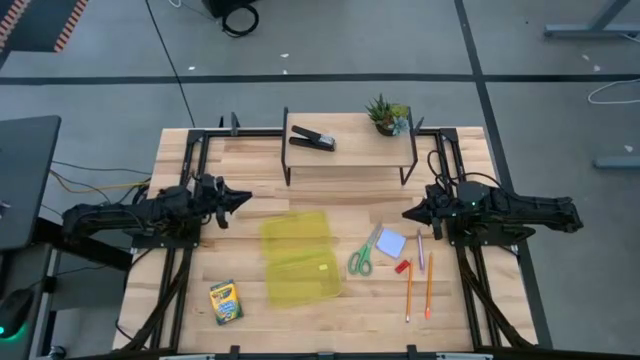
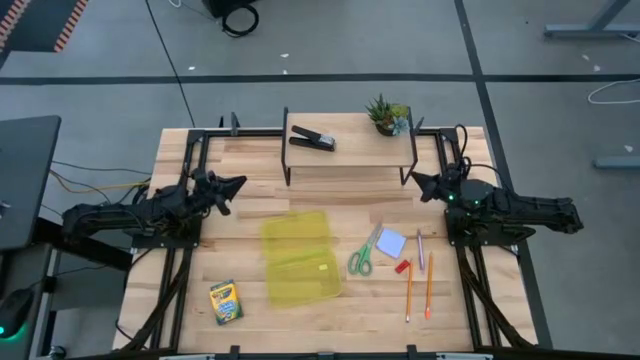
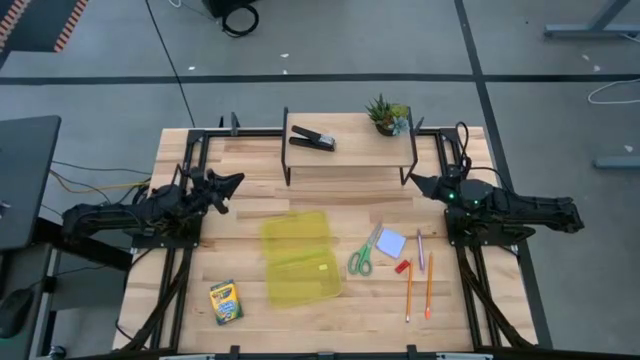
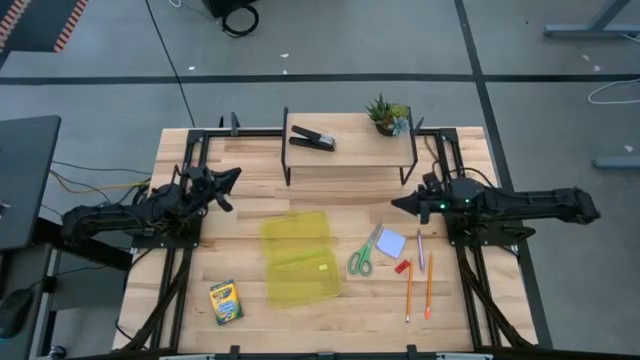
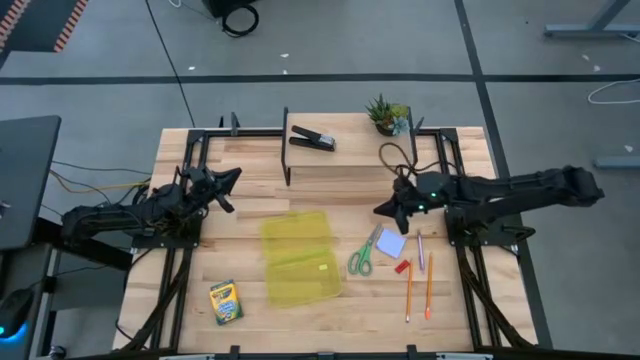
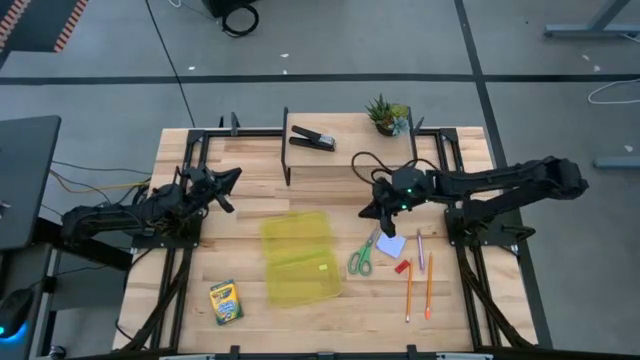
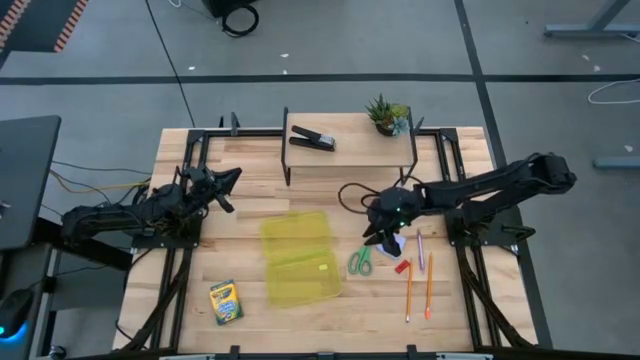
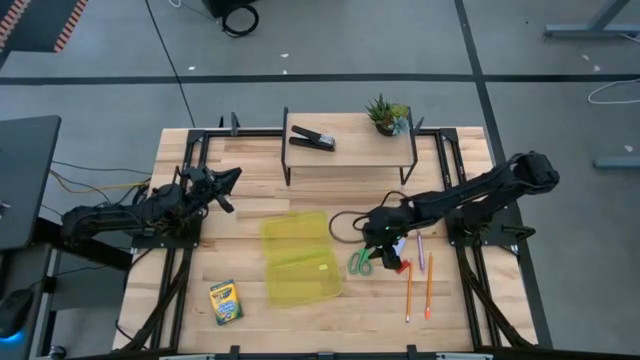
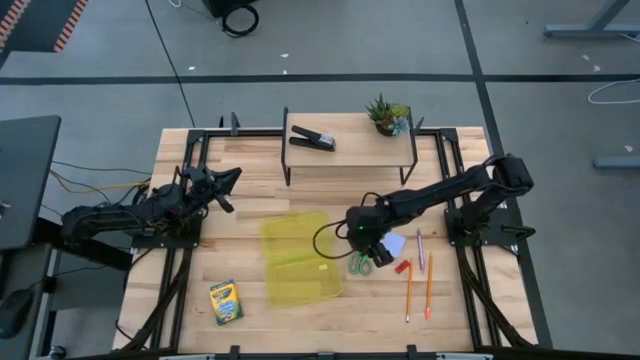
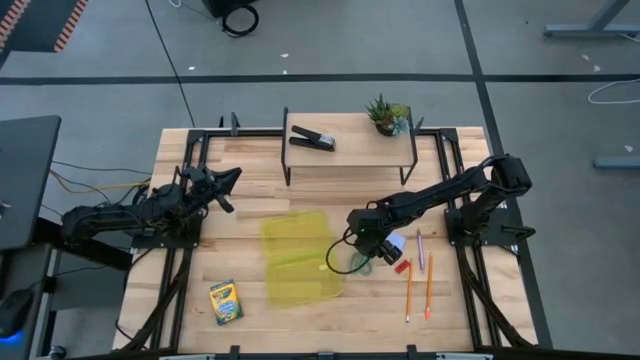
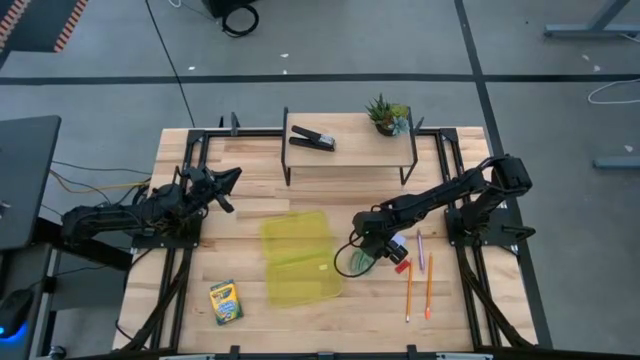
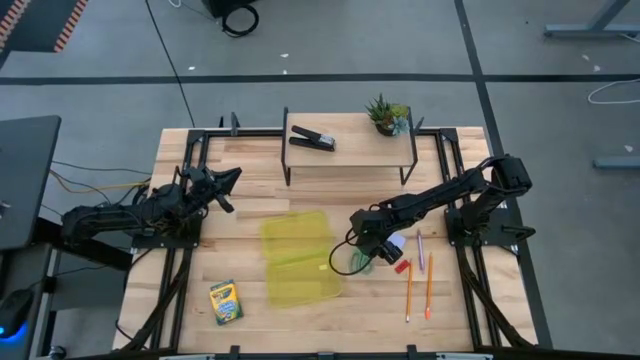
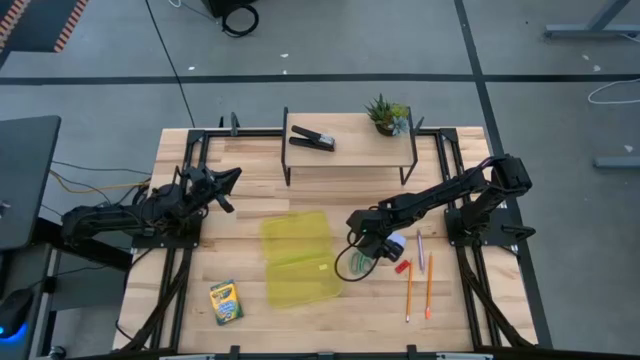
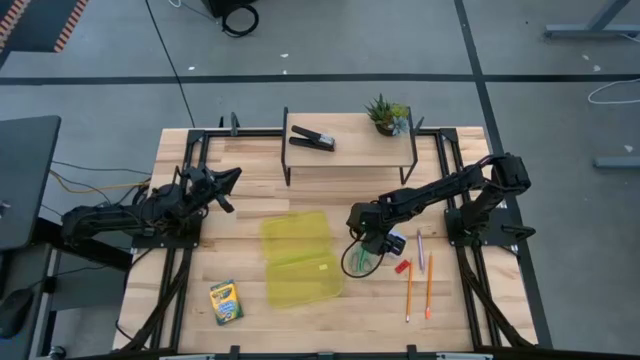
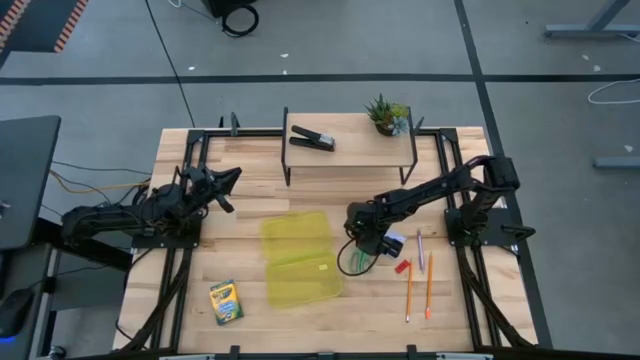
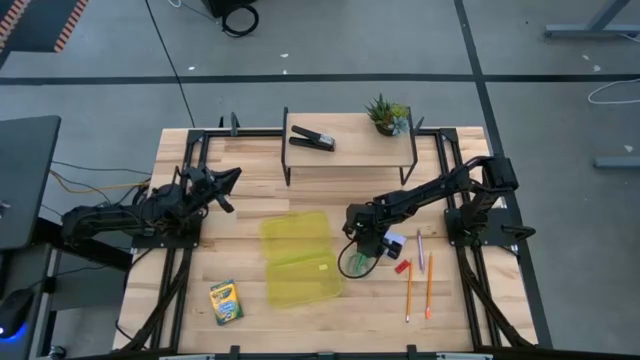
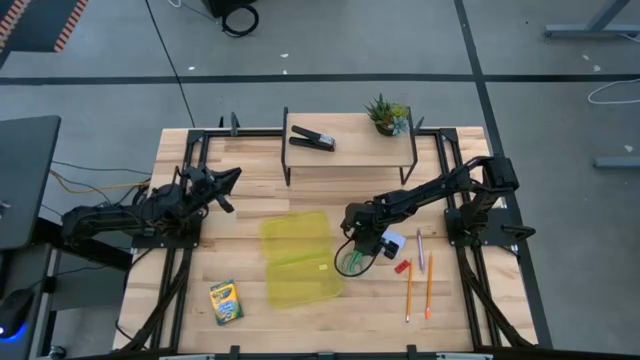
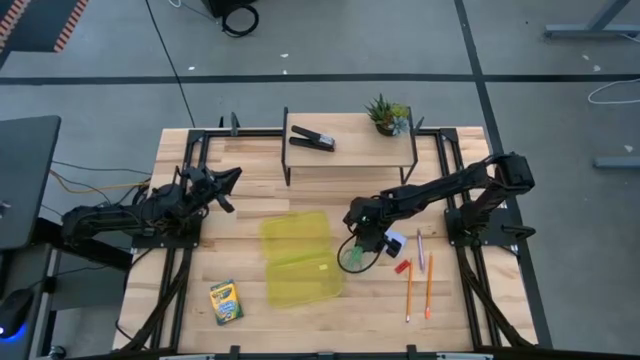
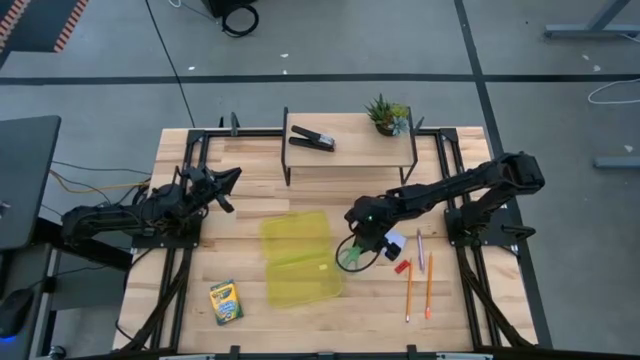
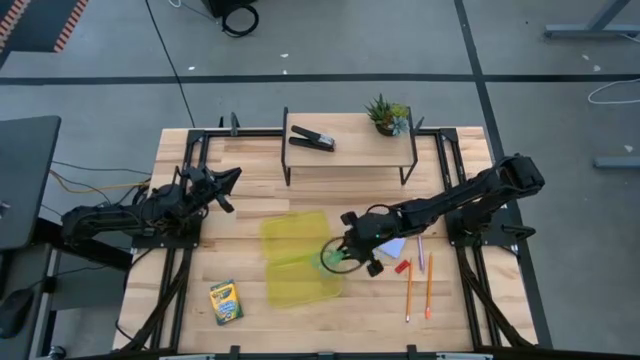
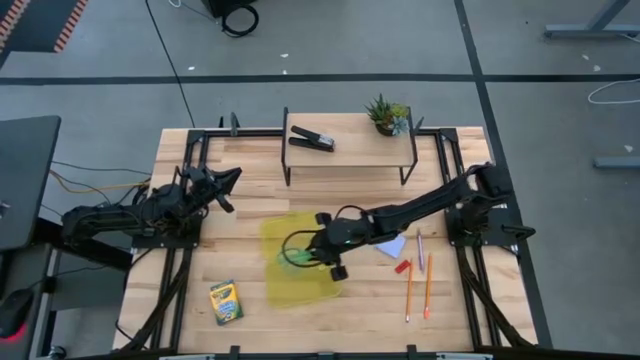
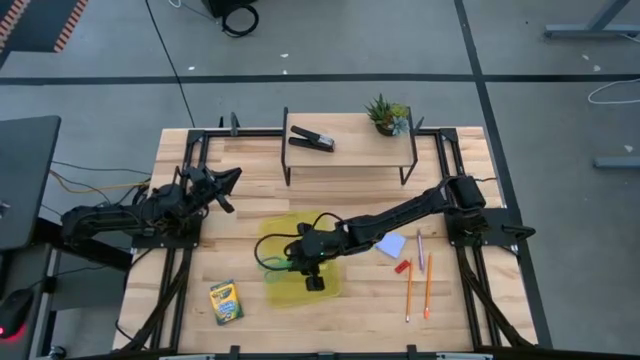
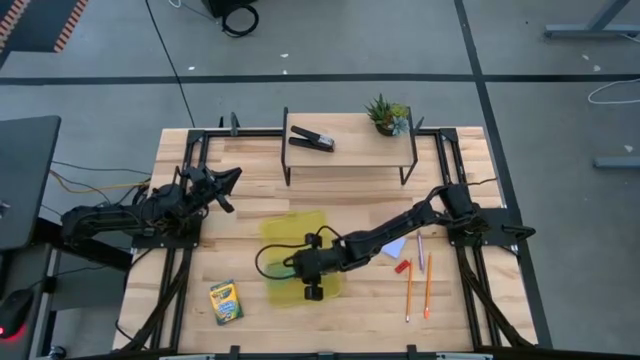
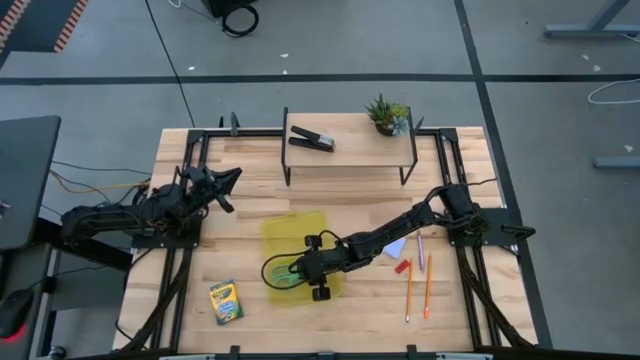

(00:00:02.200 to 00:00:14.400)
Task: Pack school essentials
Put the green scissors into the yellow supply box

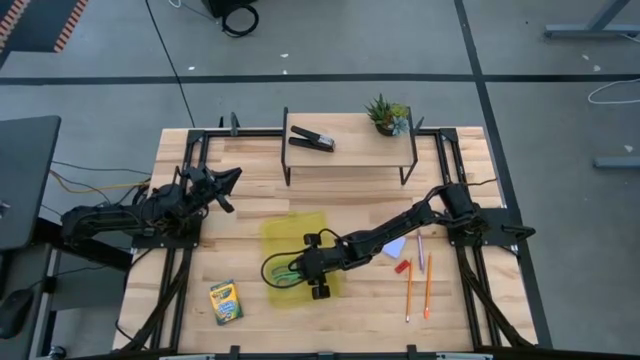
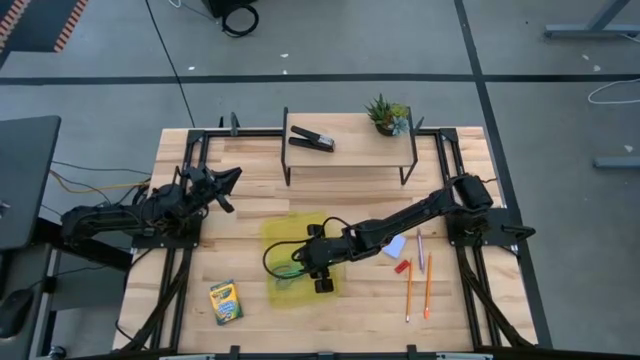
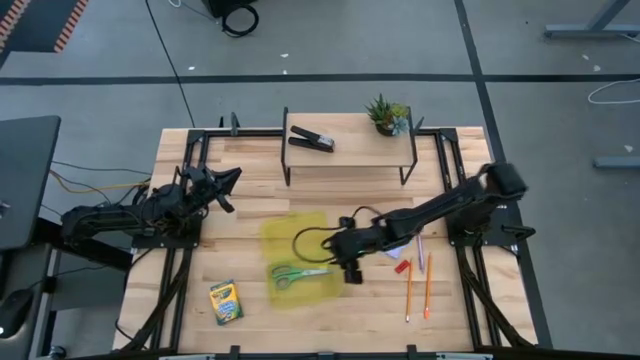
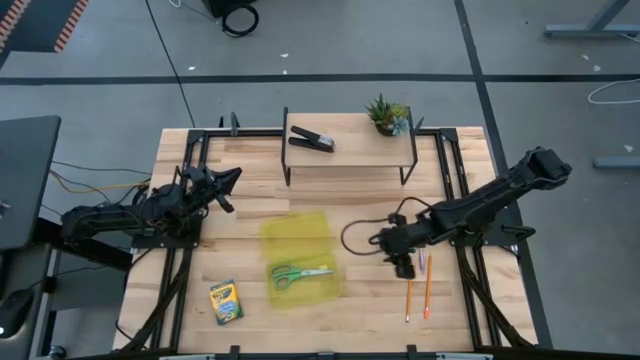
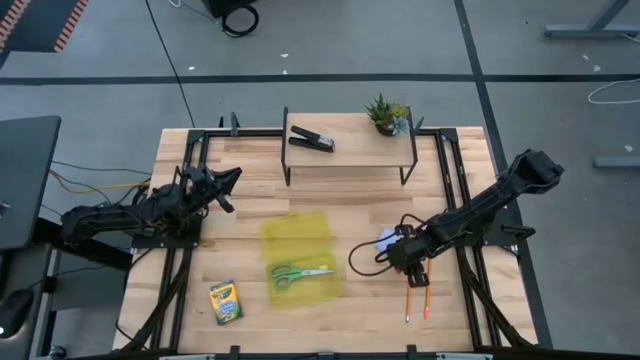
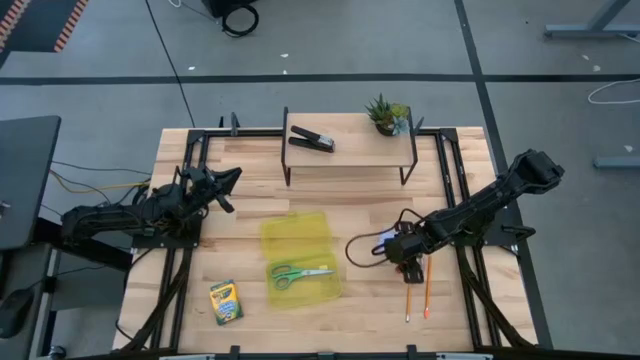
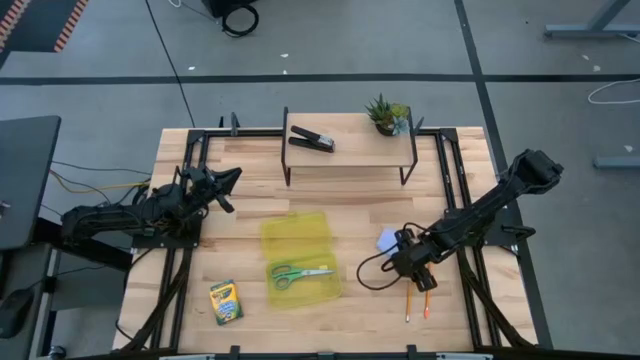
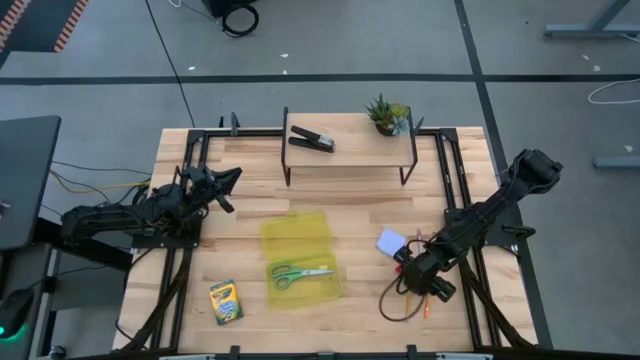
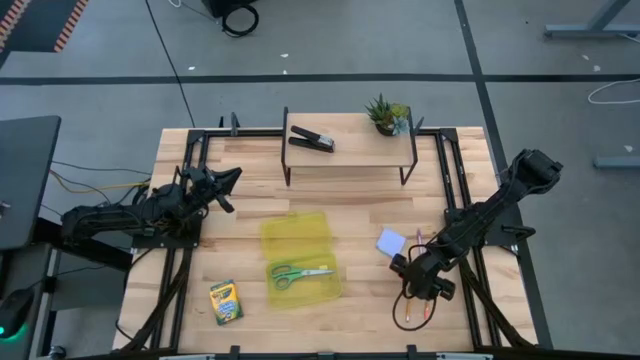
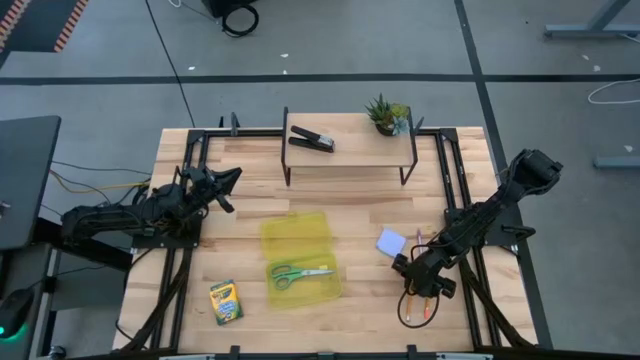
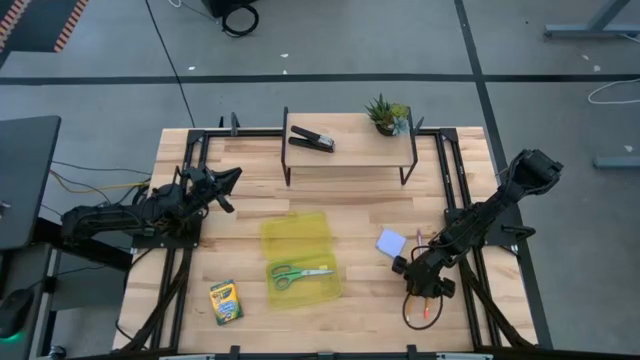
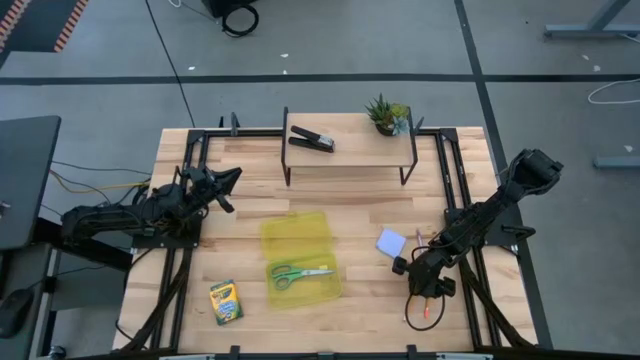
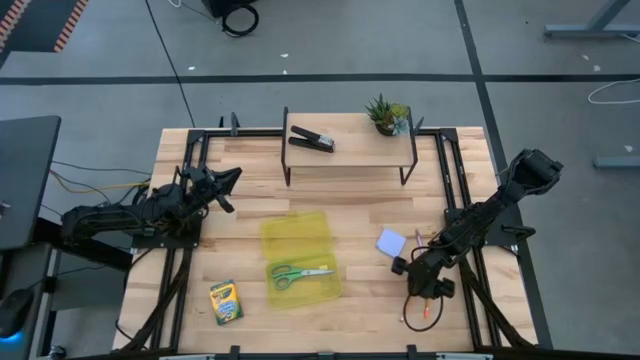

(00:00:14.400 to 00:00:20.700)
Put the orange pencil into the yellow supply box

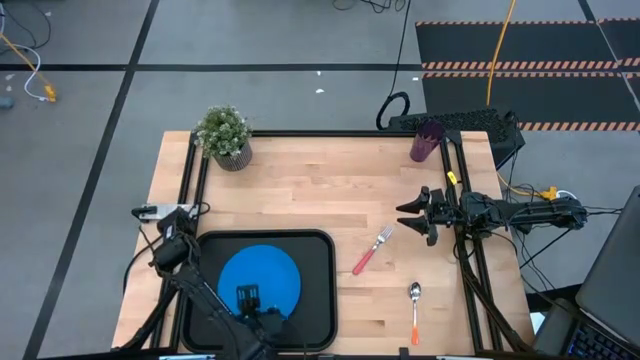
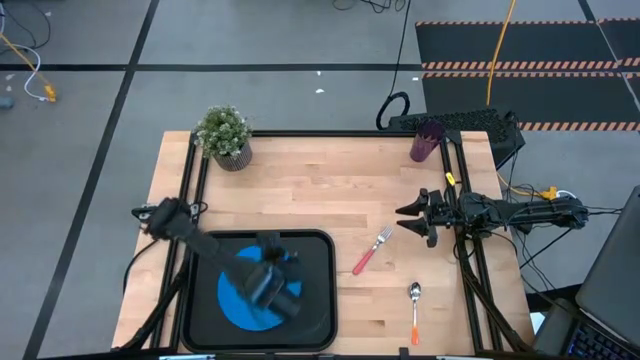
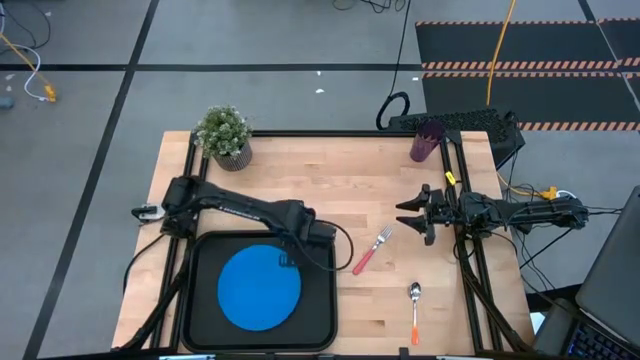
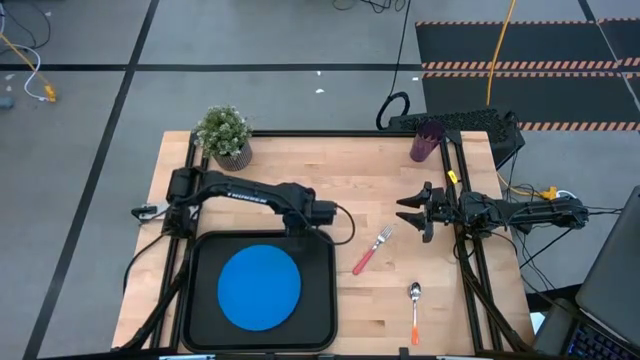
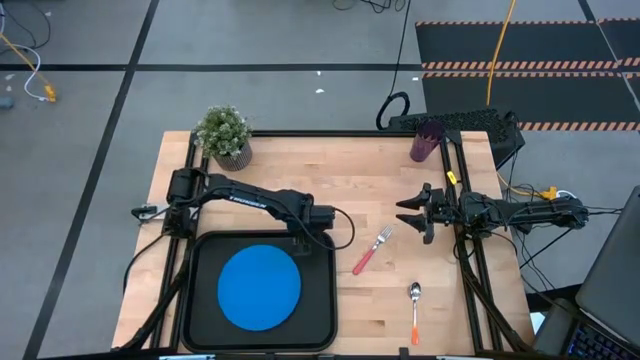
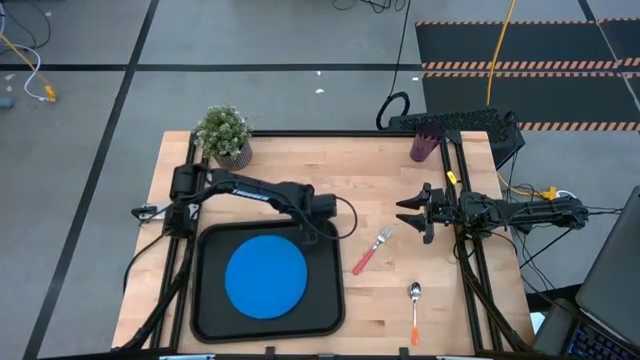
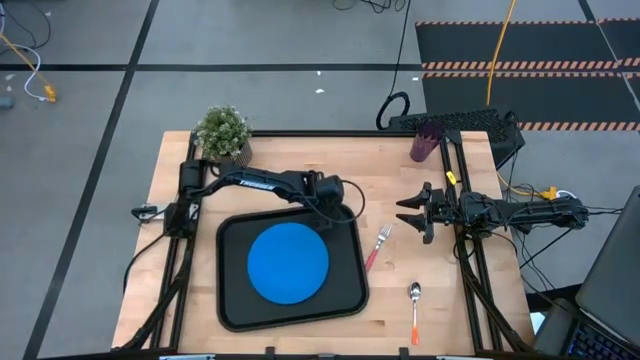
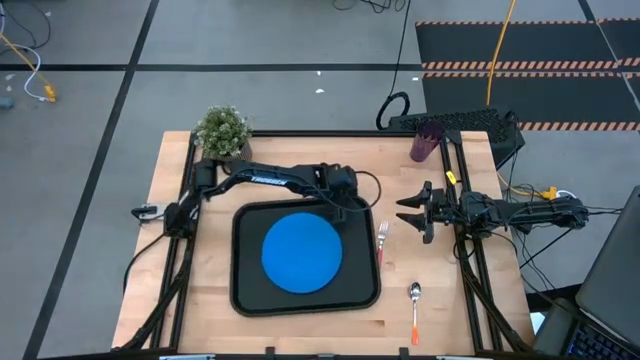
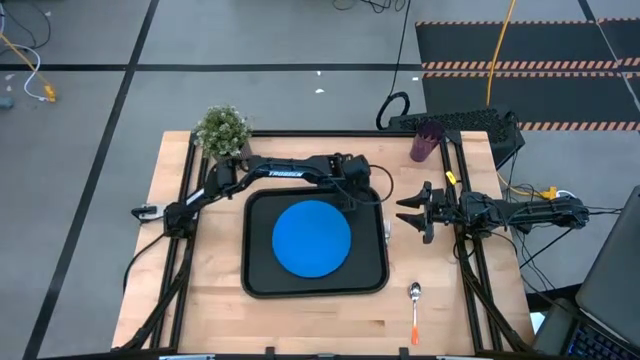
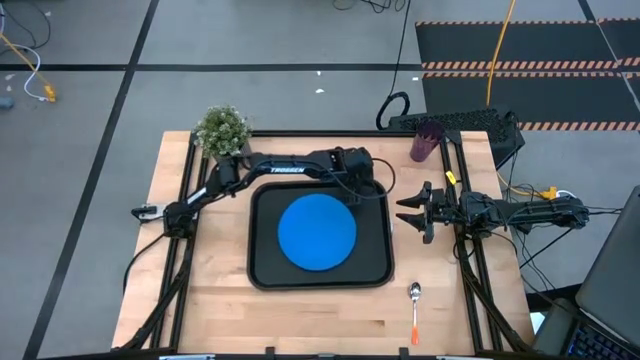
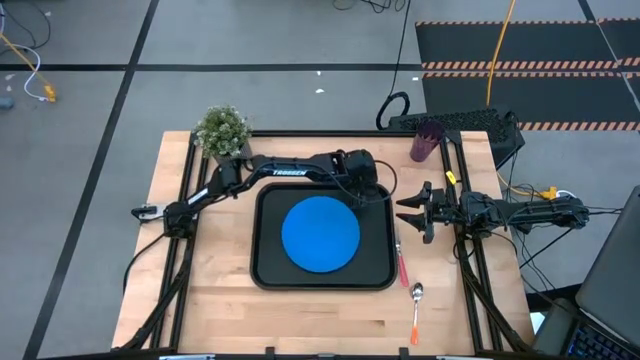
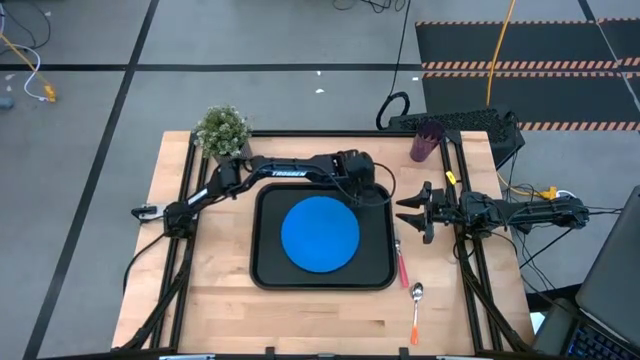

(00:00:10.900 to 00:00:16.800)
Task: Pick and place plate/cup/fork/spoon on tray
Move the black tray to the middle
